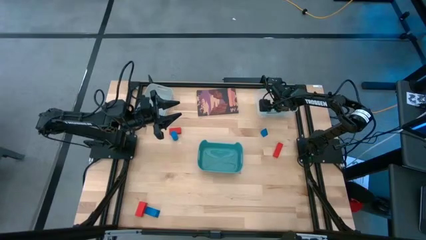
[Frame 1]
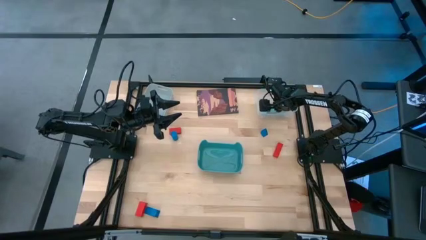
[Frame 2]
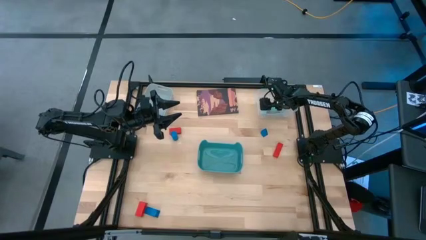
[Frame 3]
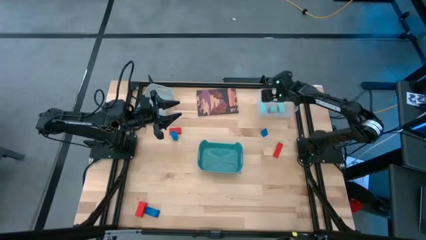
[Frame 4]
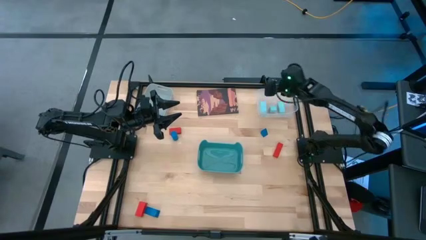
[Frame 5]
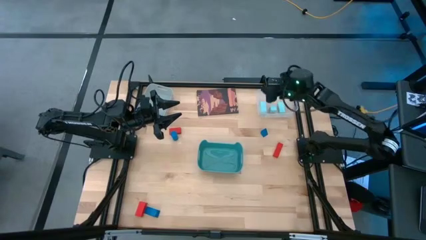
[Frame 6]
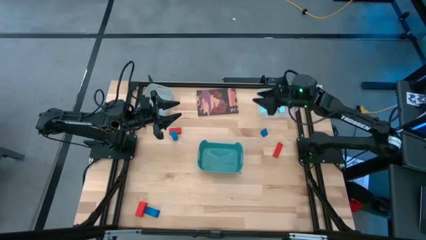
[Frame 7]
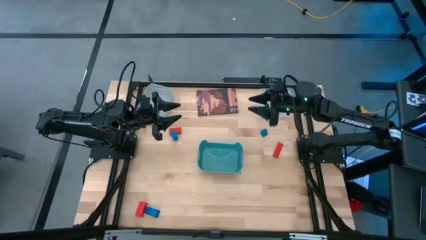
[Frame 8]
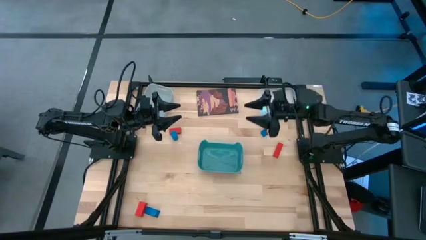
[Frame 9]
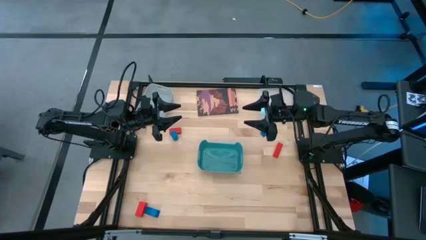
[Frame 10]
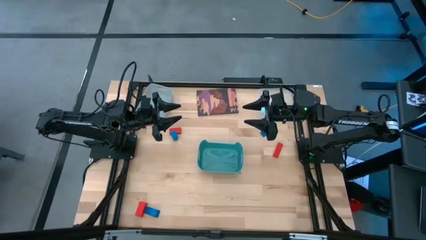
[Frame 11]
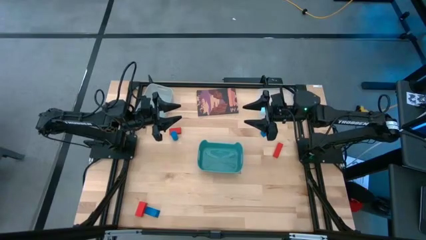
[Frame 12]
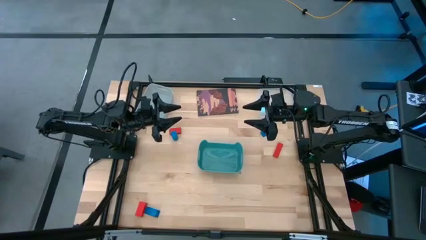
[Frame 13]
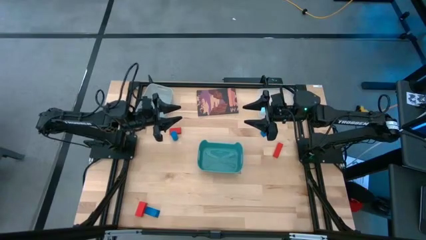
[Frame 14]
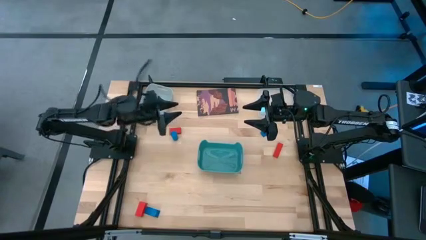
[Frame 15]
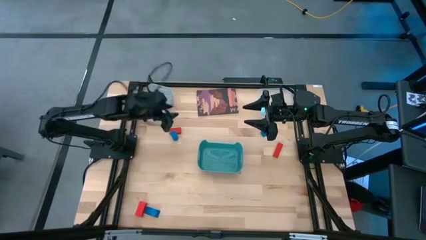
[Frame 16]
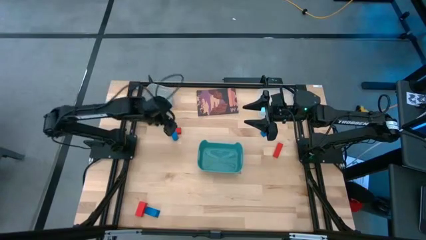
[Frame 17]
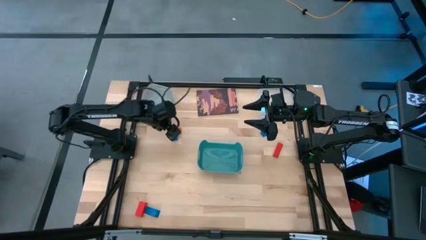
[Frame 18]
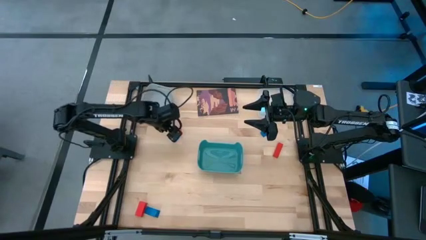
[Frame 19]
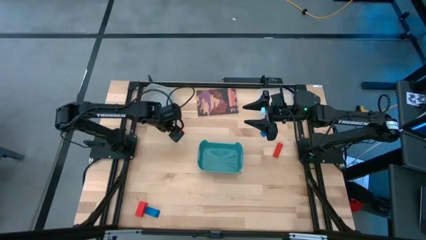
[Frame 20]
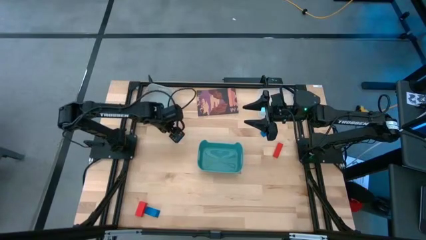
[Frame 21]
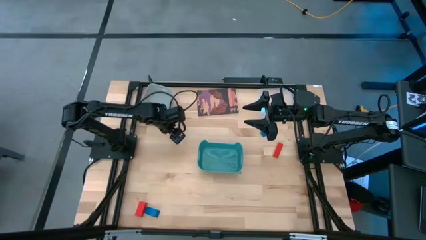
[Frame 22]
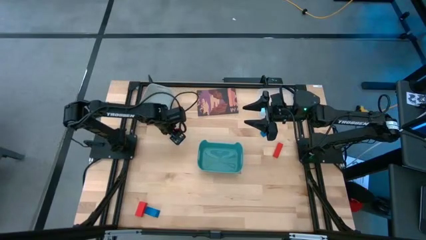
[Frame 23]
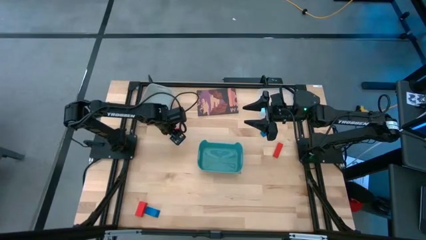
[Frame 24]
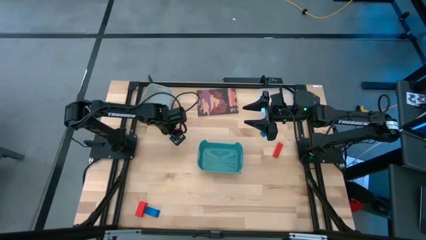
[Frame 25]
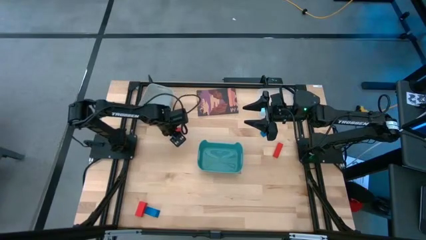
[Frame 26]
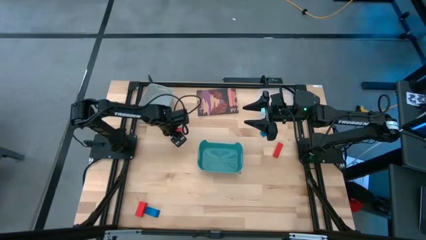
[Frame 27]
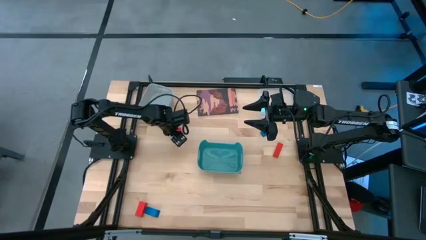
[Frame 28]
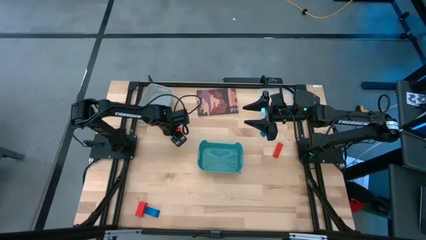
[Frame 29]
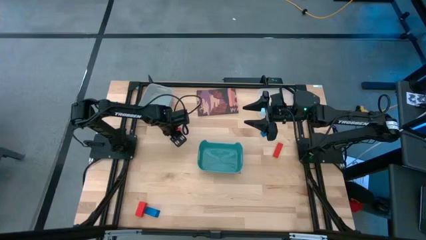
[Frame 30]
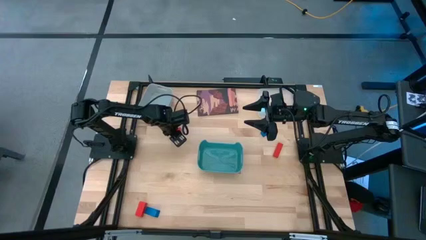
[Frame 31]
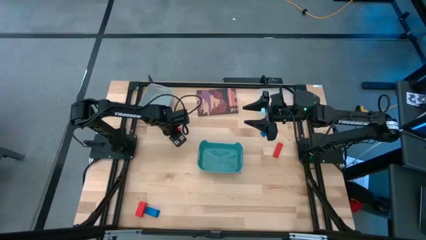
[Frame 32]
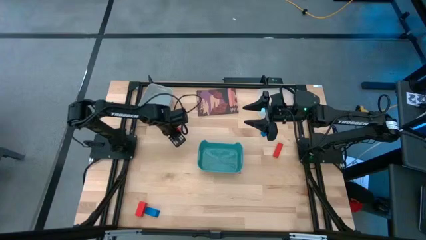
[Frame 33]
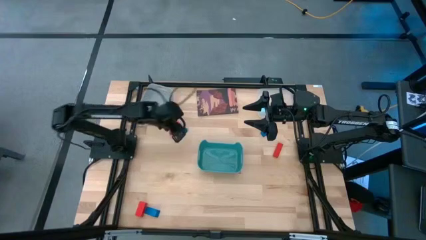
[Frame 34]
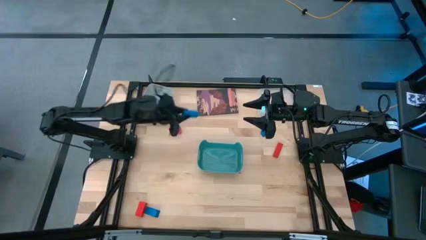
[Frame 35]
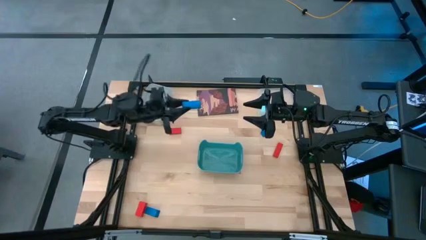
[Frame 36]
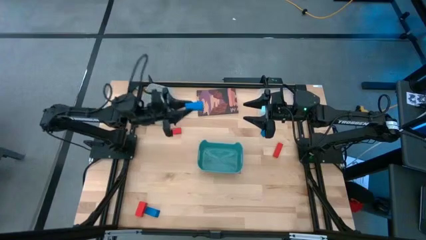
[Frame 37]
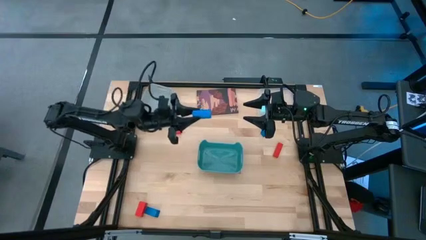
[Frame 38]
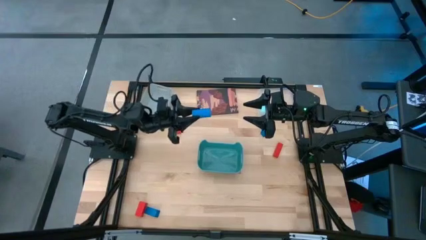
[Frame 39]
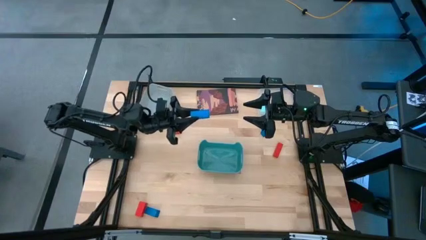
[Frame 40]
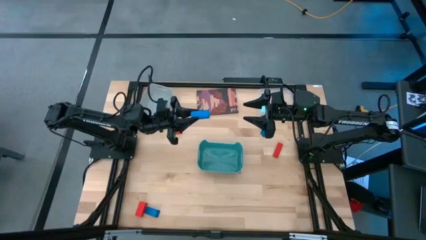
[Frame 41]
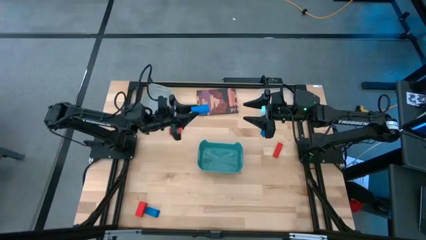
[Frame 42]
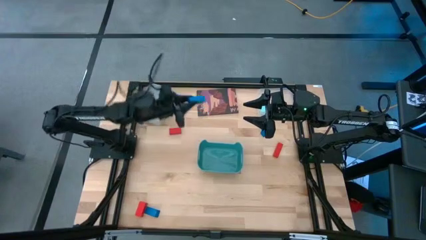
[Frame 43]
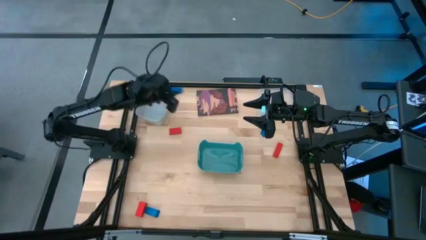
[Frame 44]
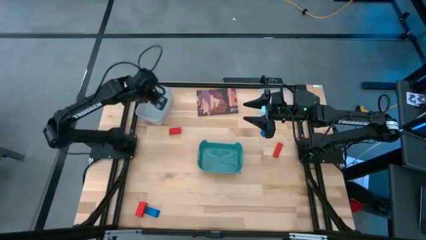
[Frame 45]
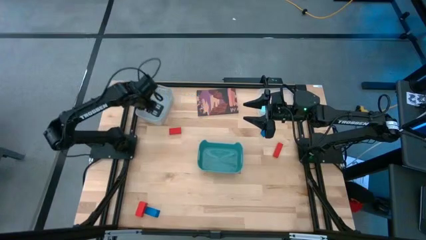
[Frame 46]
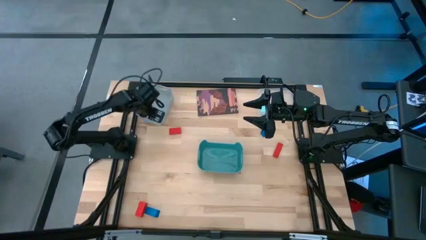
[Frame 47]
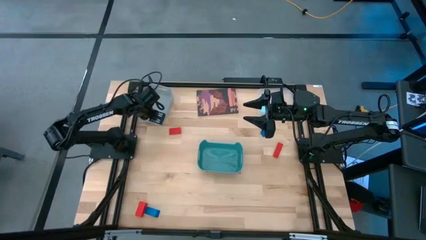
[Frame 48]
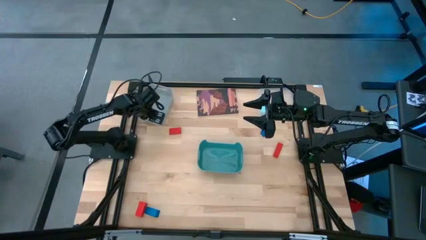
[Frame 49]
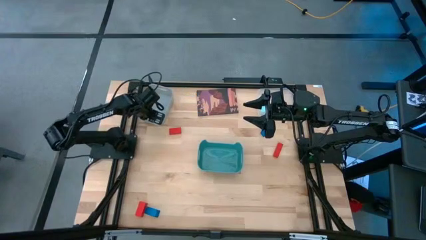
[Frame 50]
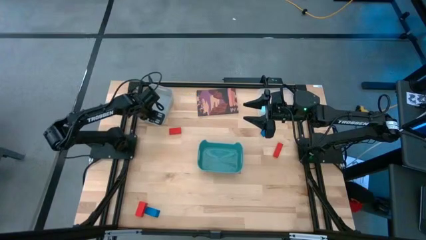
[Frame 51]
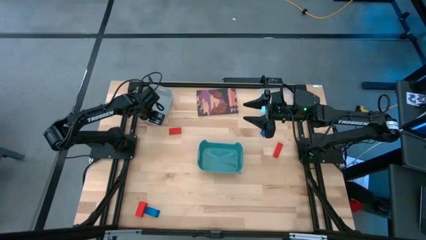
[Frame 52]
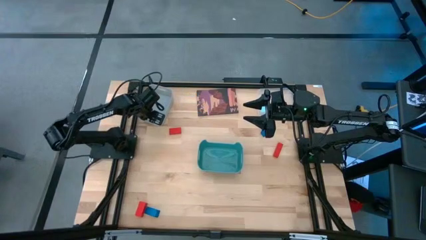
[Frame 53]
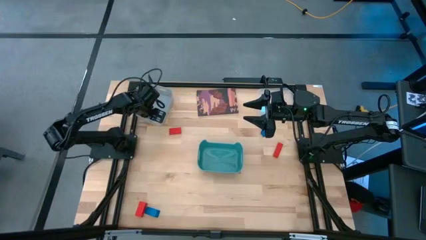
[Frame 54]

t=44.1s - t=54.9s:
Task: Sort & place blocks by color
Put the cylinder blue block into the white bin
